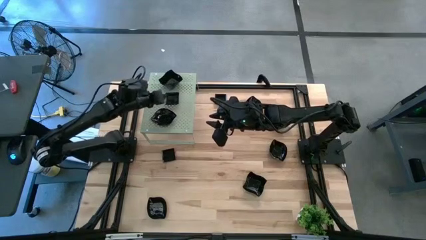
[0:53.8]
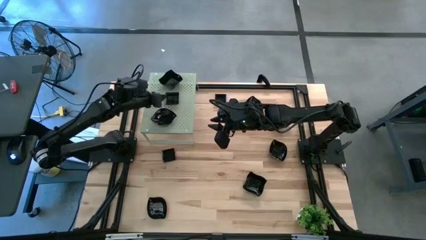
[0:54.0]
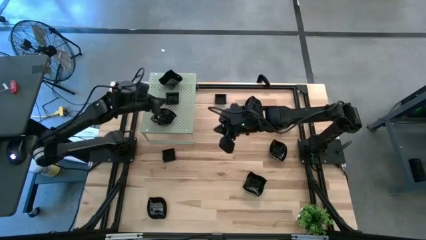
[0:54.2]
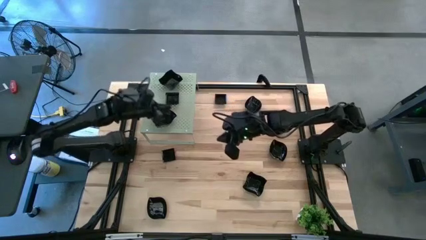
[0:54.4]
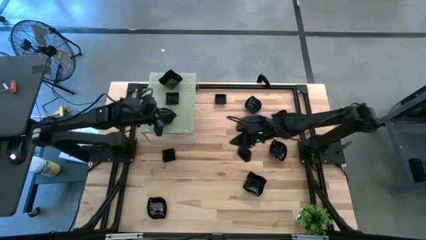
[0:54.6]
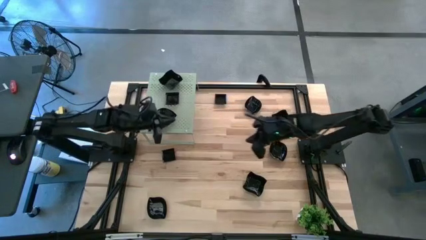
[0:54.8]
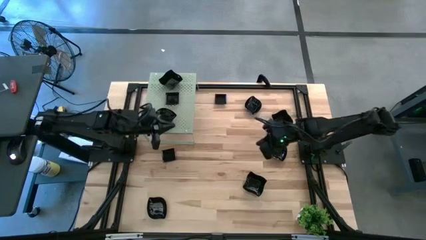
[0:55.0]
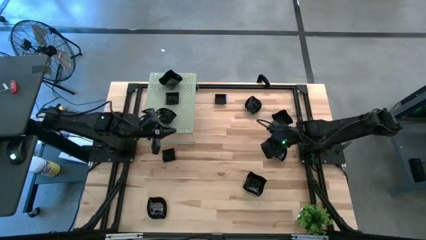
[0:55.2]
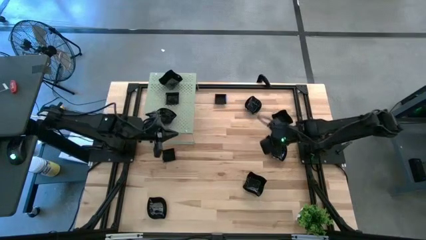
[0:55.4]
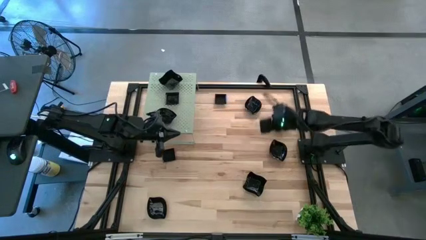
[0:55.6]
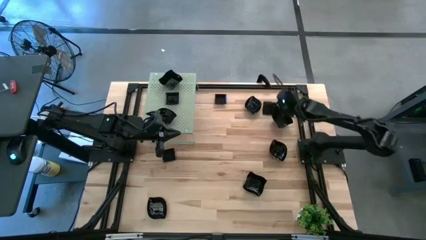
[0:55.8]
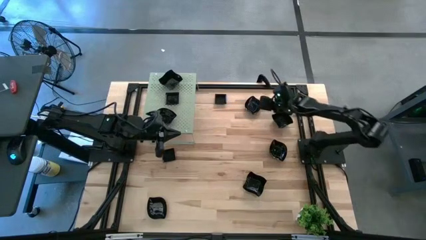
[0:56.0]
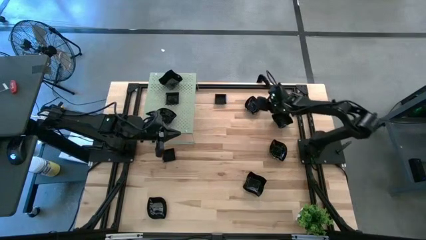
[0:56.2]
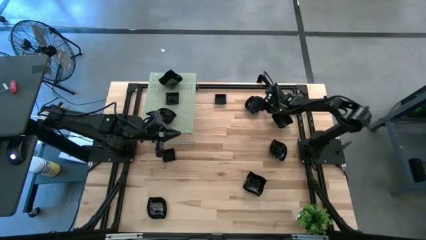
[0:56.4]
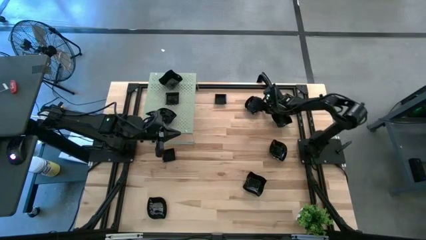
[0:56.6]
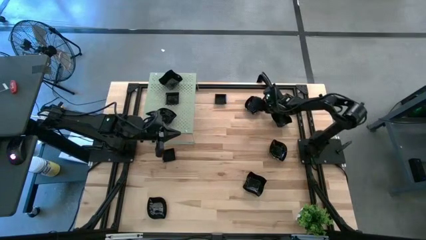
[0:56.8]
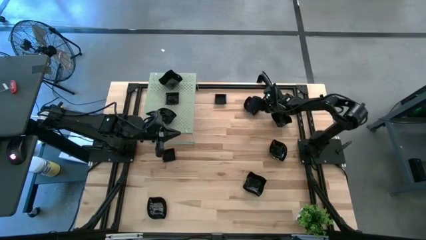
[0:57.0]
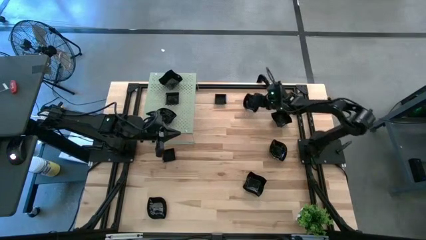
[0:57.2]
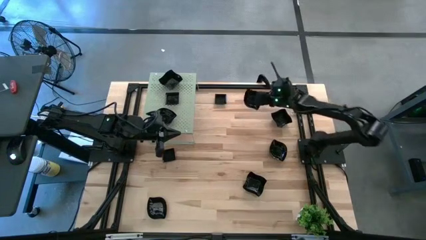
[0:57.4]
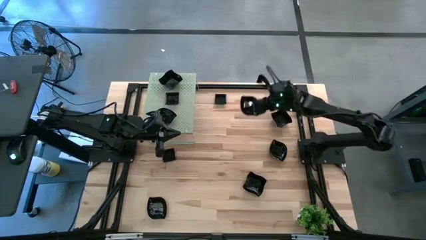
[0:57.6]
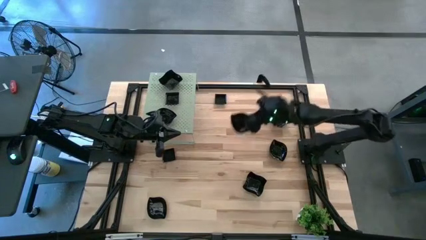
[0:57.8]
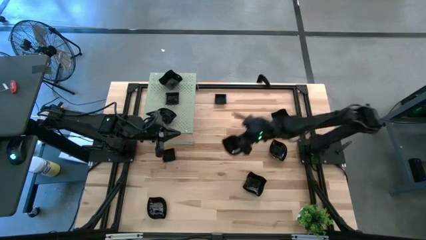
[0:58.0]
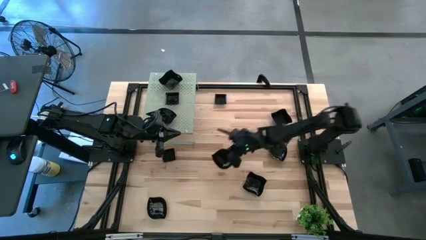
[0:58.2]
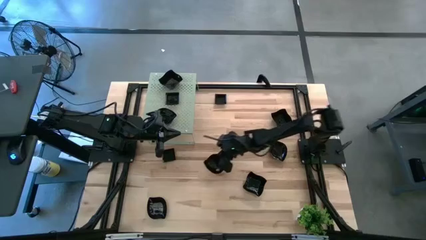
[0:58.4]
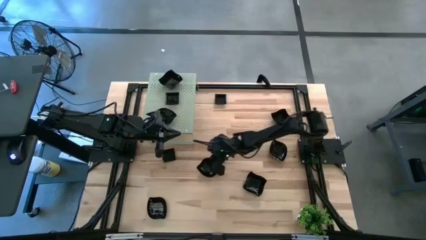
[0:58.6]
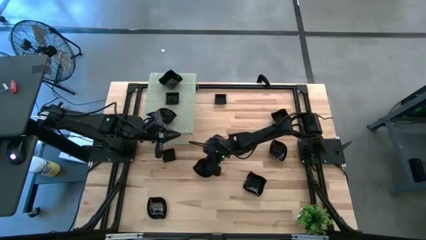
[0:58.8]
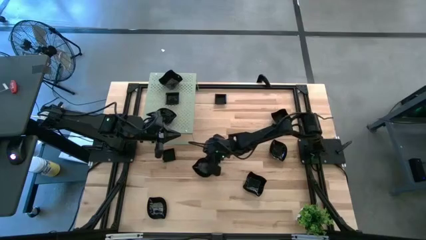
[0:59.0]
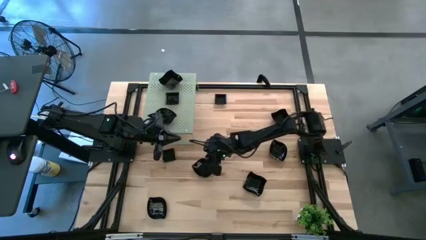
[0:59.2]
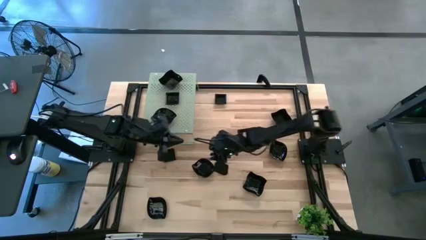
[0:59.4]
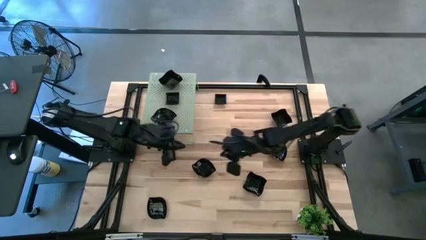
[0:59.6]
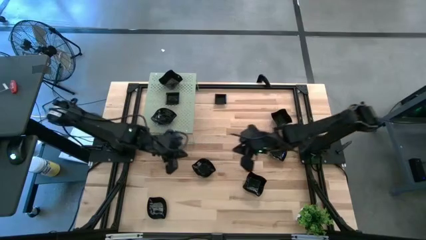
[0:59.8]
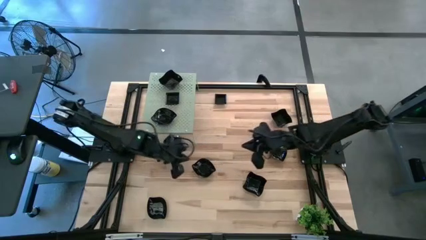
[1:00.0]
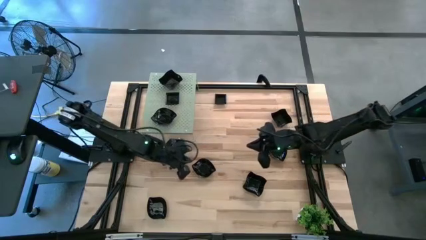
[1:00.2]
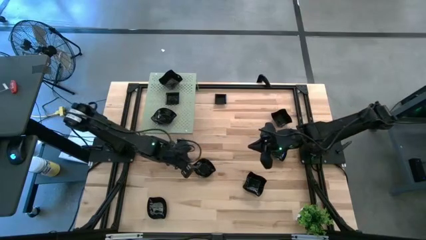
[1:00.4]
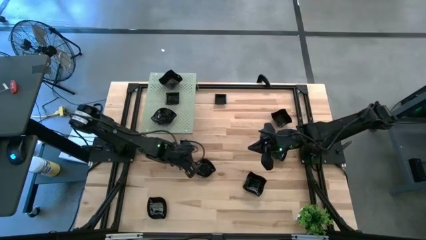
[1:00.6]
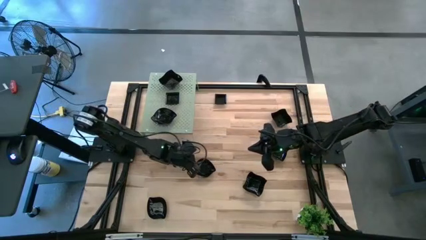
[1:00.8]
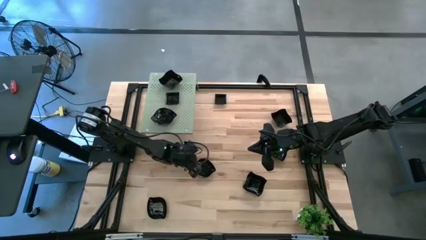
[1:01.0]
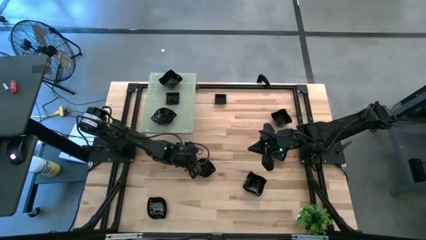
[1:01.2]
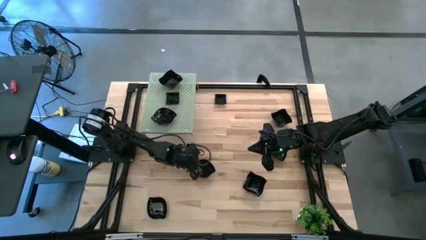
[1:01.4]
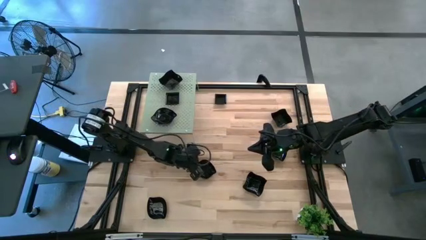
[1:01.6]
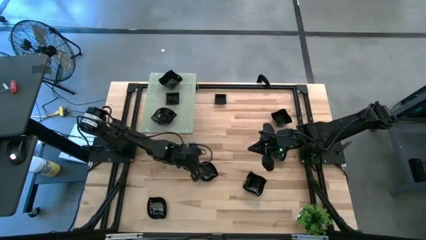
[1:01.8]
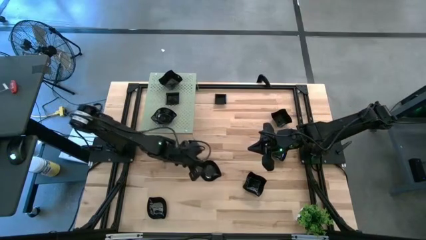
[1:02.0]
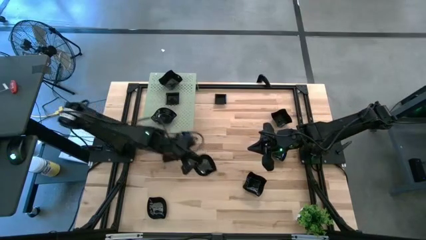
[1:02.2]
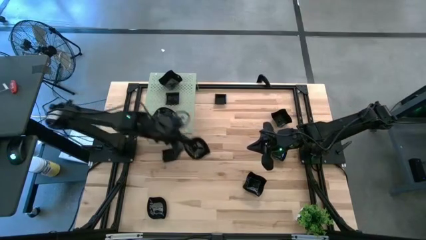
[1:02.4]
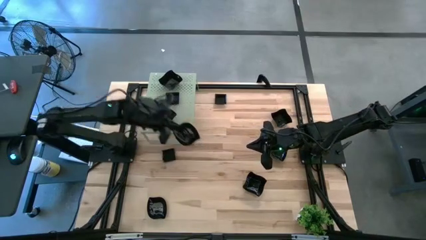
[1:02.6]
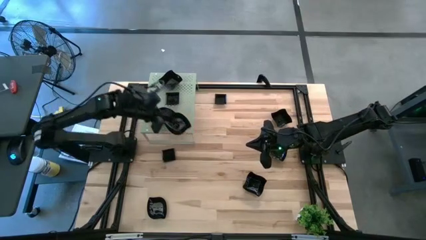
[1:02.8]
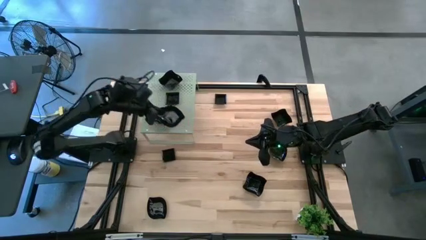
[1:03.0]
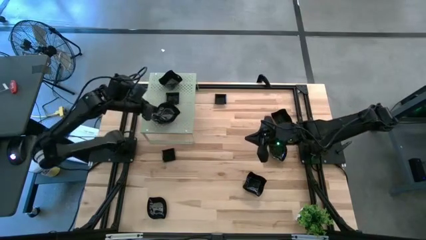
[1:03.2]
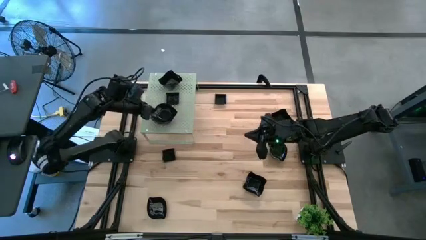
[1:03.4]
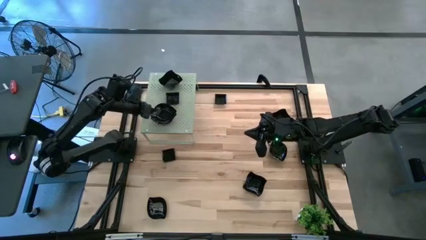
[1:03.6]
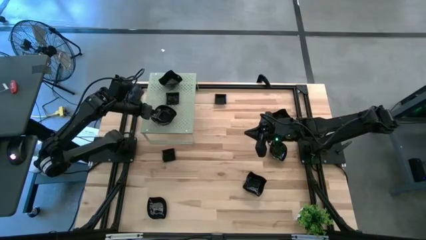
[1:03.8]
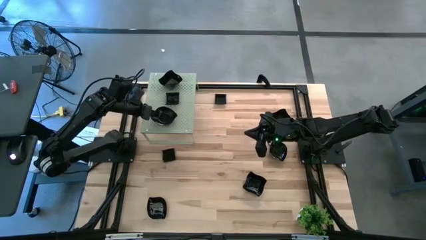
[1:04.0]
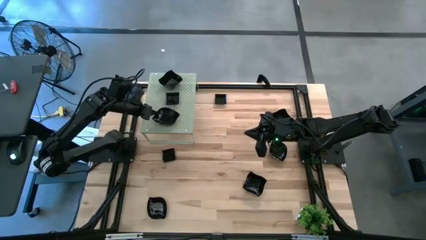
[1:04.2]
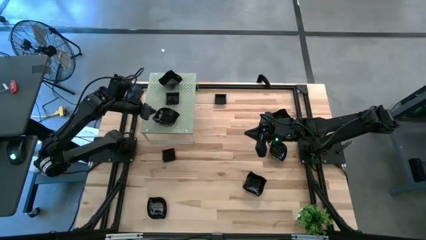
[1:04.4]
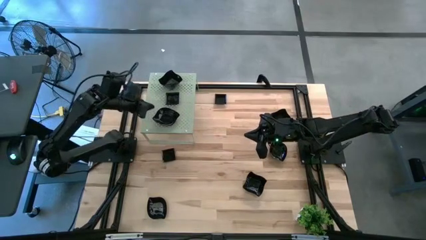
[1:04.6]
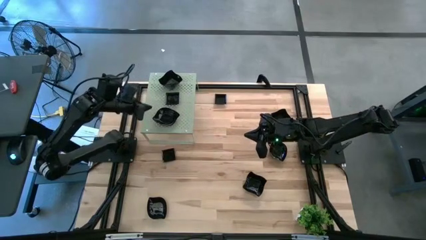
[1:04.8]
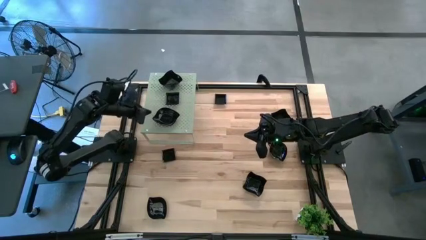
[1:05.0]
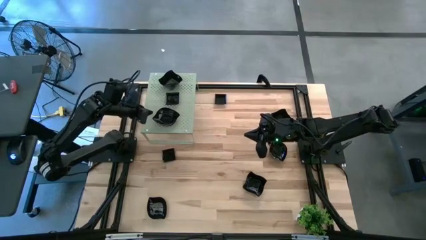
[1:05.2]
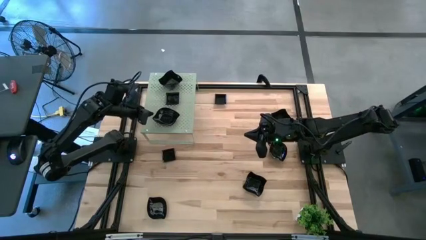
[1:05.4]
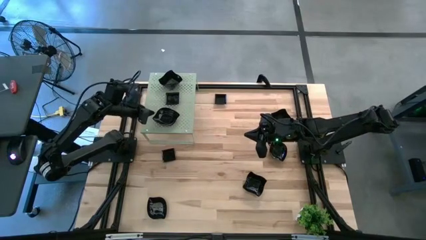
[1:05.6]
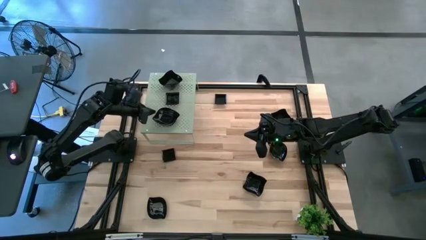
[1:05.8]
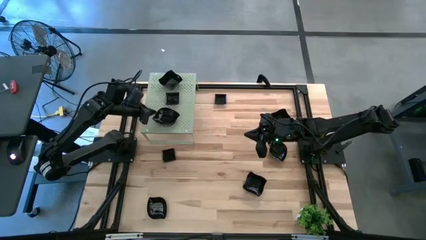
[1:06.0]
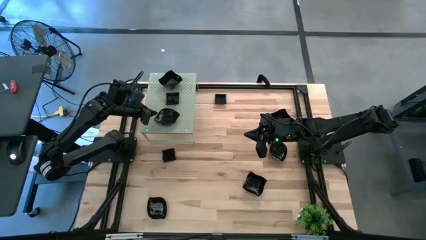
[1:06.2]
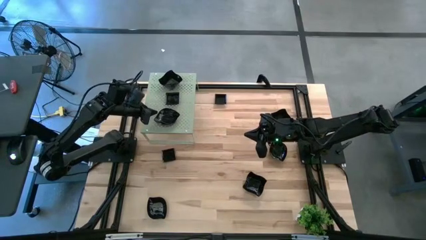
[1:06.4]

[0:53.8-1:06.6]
Task: Pick & Place Mini shaped plates
Stack the leaf-shaped plate on the other leaf-shaped plate on the shelf
